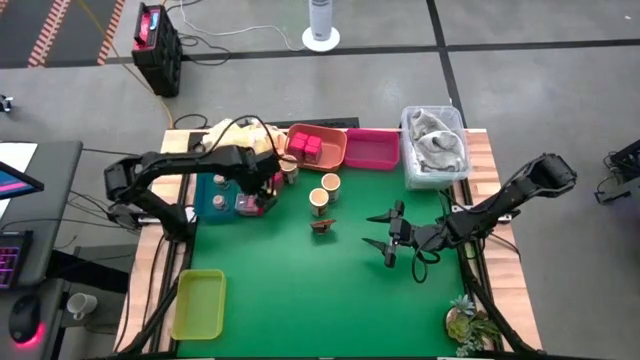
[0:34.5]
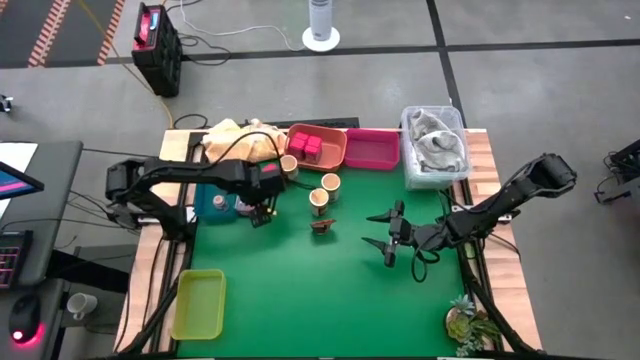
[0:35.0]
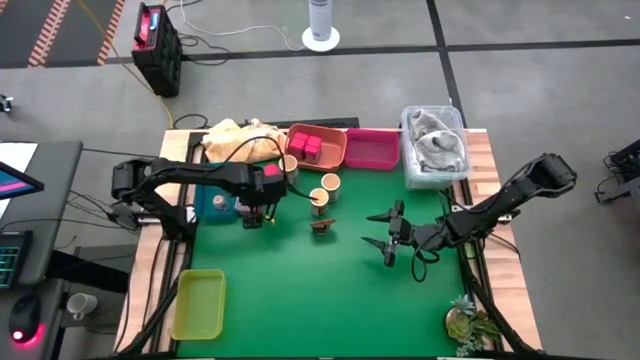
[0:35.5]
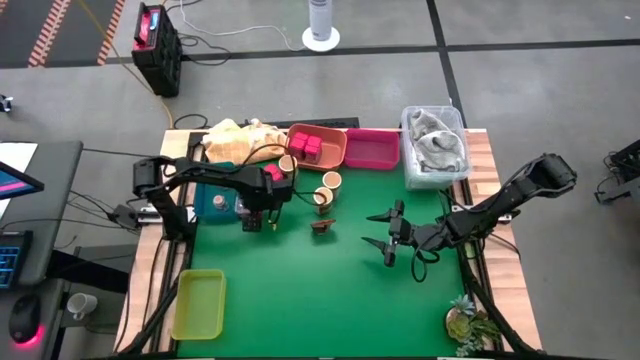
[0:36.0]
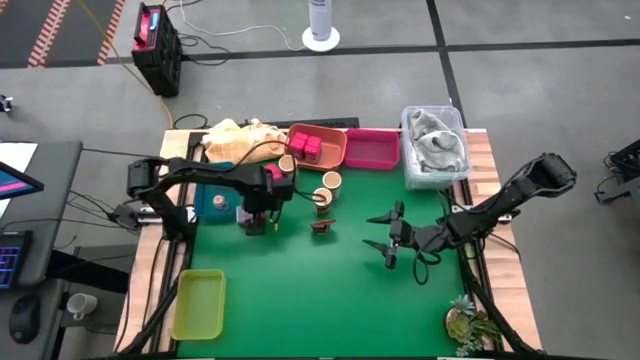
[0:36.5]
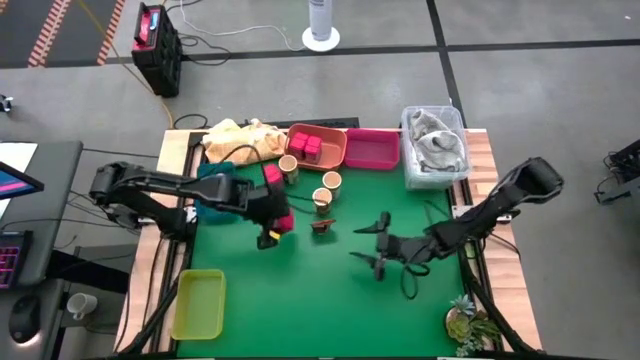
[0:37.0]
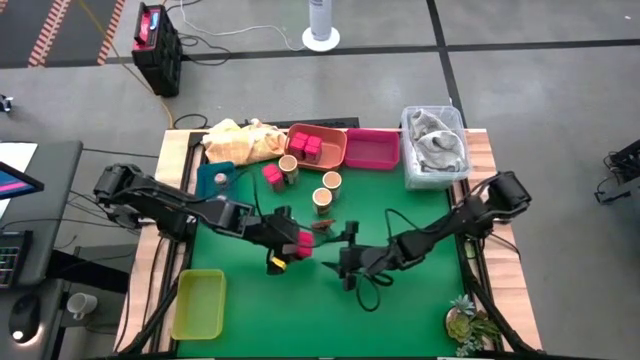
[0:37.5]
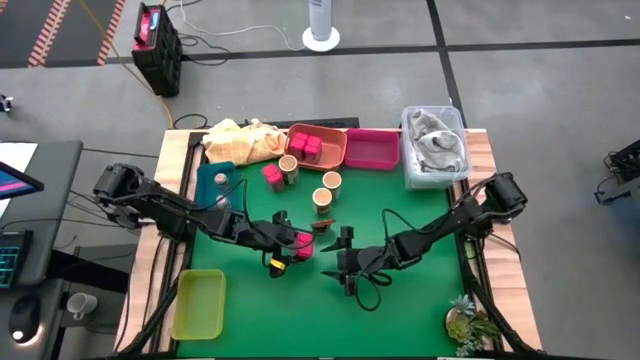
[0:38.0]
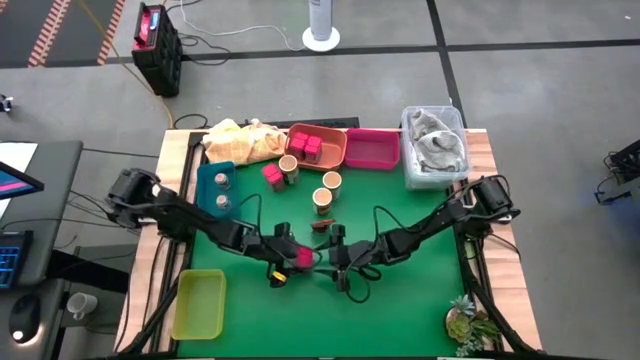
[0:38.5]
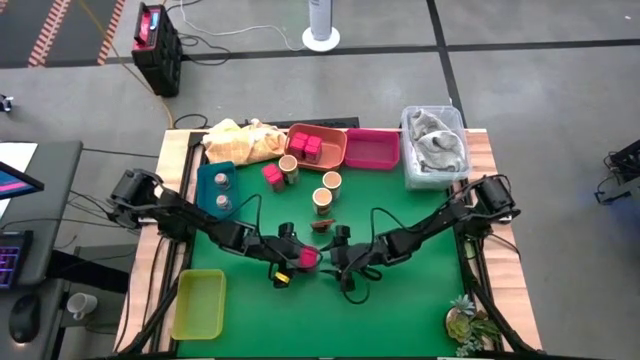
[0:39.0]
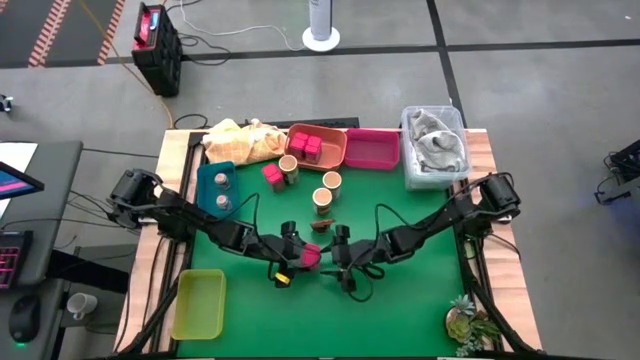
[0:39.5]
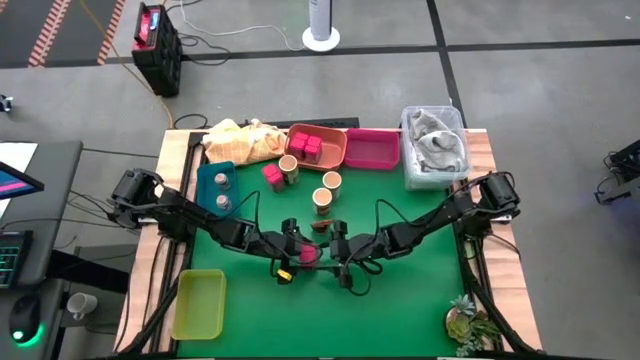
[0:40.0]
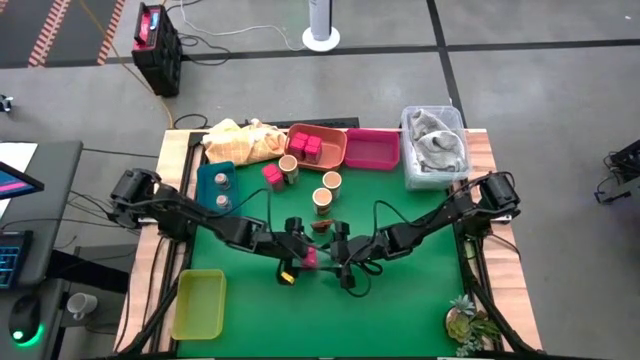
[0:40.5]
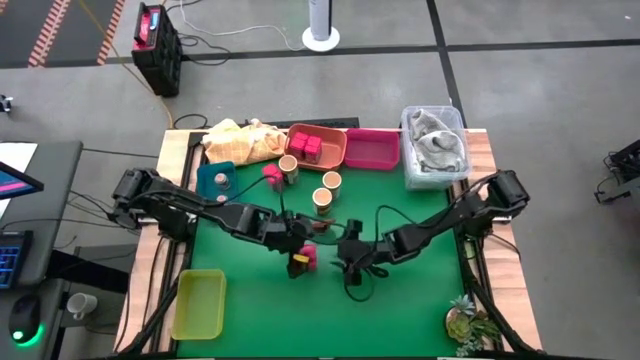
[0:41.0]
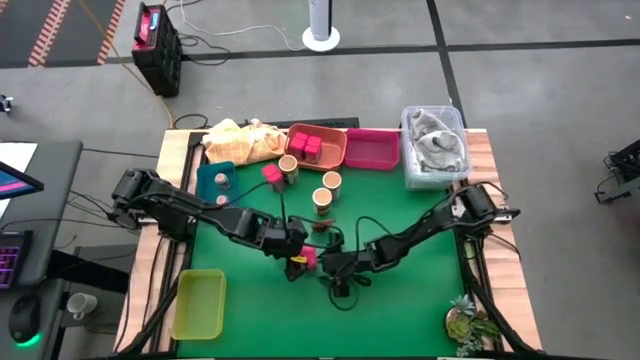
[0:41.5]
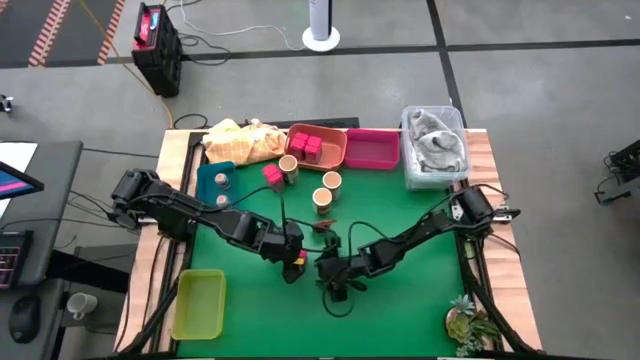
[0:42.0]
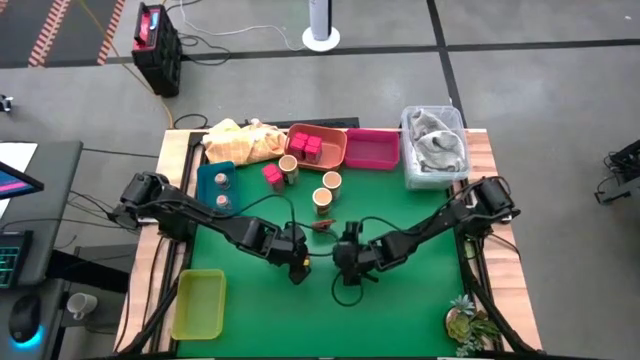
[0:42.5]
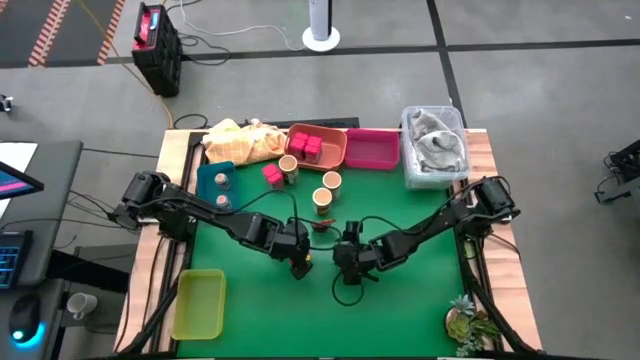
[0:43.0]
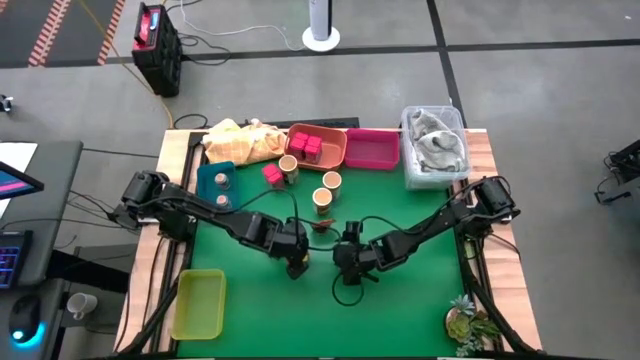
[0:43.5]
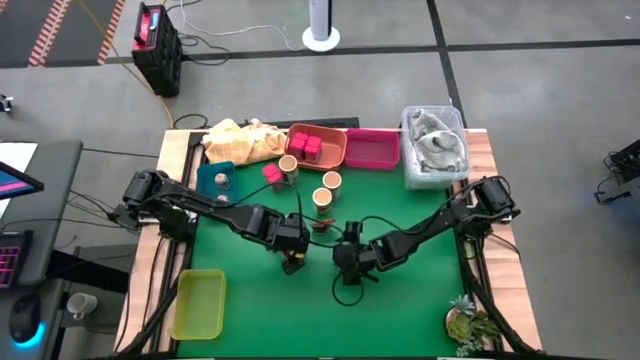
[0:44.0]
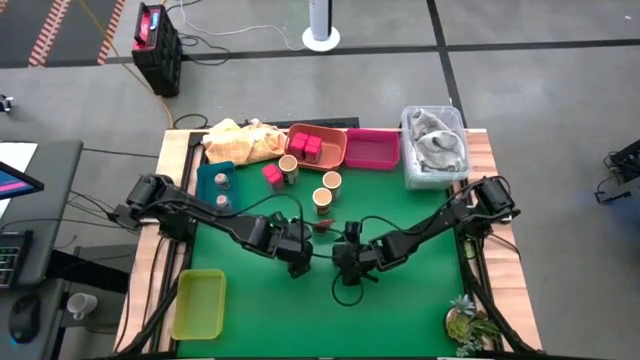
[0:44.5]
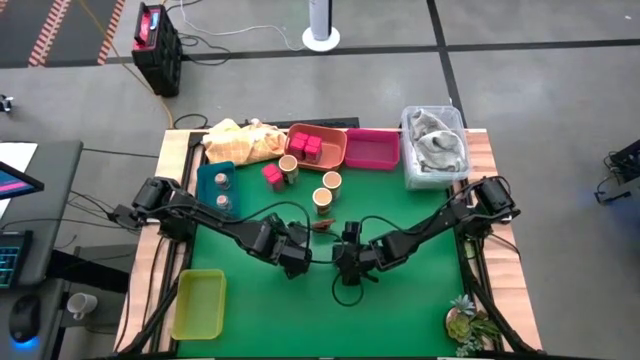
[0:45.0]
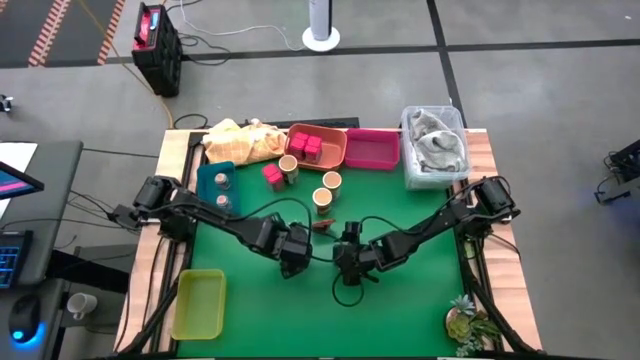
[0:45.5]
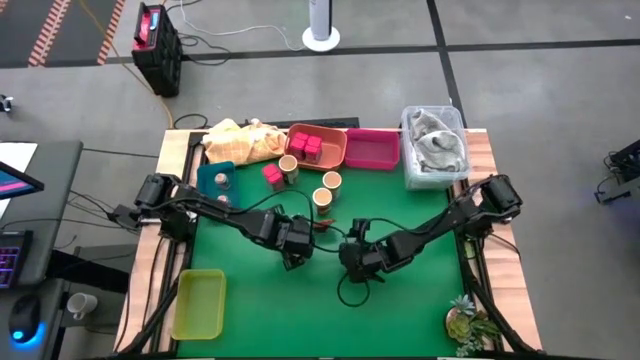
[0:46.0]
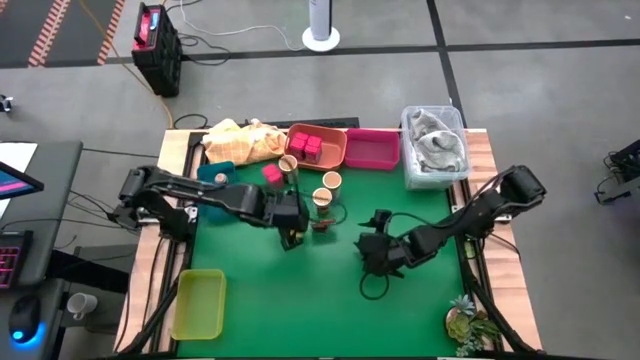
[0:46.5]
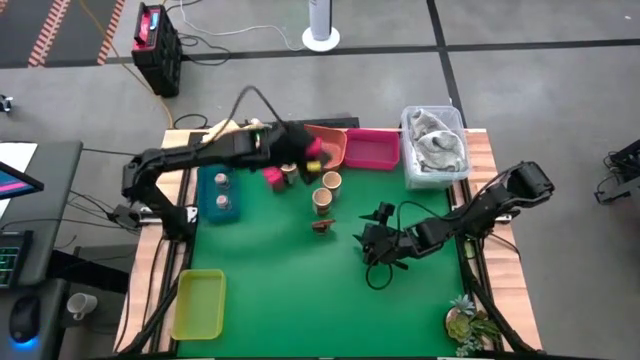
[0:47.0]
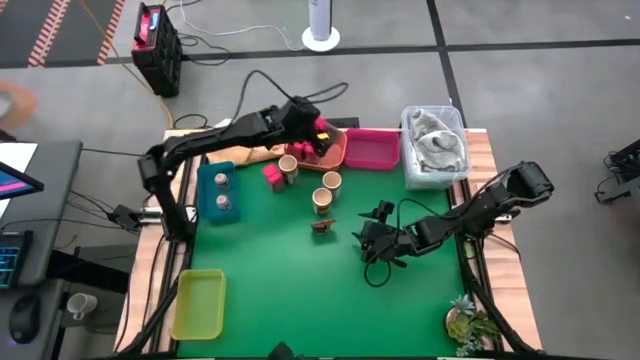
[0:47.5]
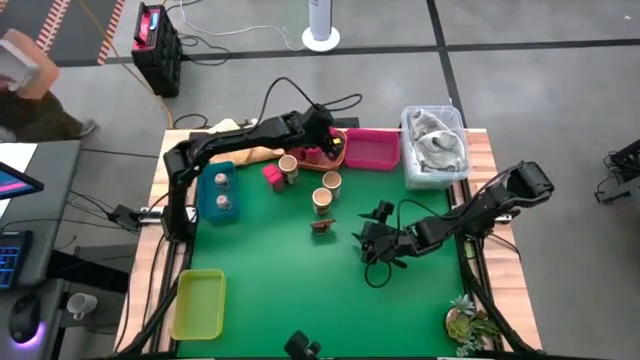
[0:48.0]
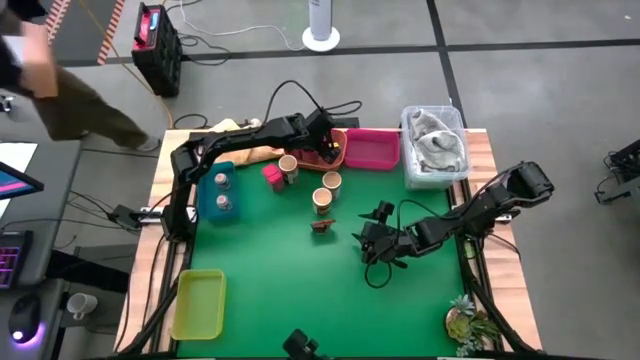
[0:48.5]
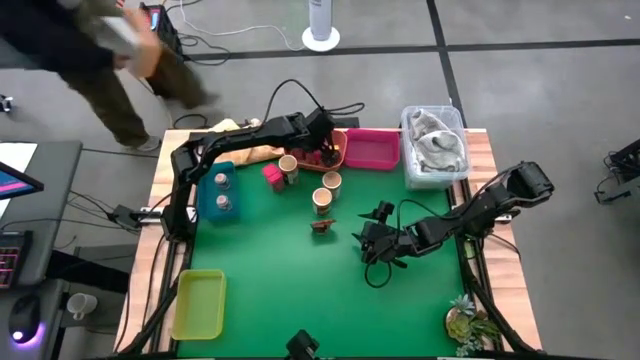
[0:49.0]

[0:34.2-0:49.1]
Task: Sort spices by type
Put the left red seasoning can into the orange bin

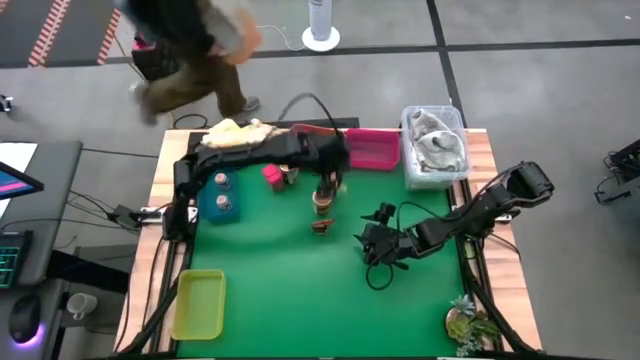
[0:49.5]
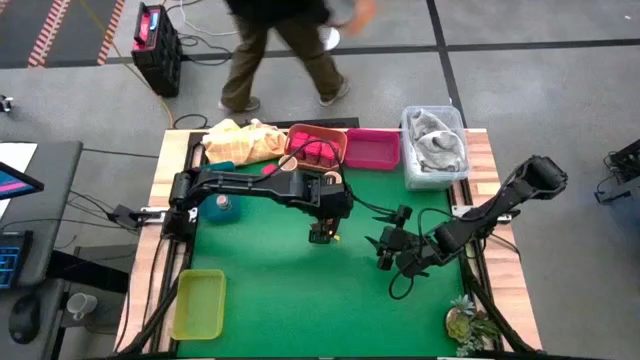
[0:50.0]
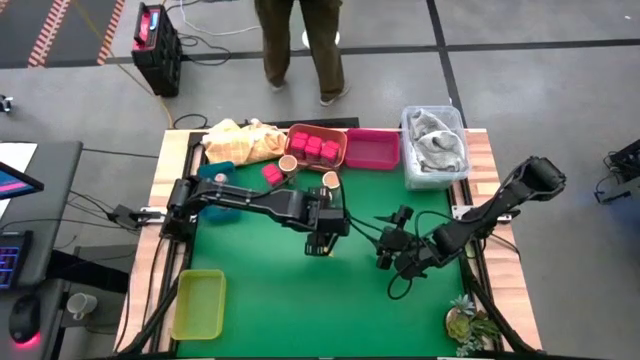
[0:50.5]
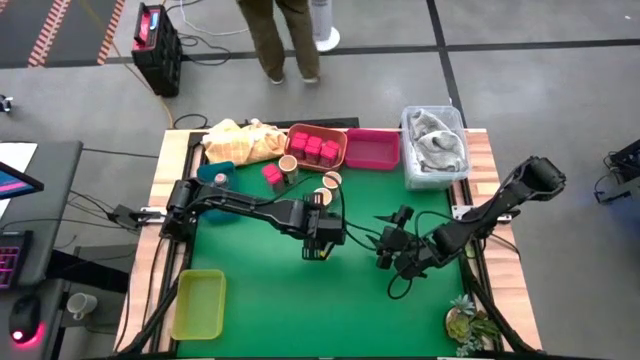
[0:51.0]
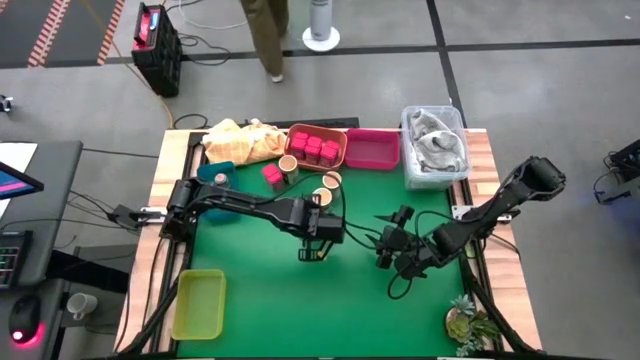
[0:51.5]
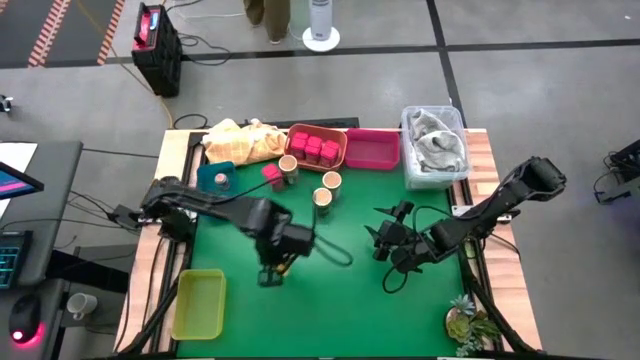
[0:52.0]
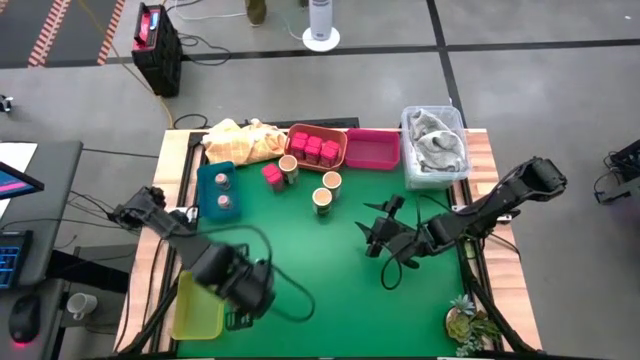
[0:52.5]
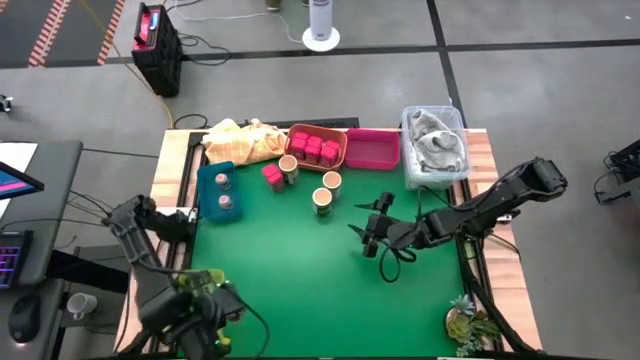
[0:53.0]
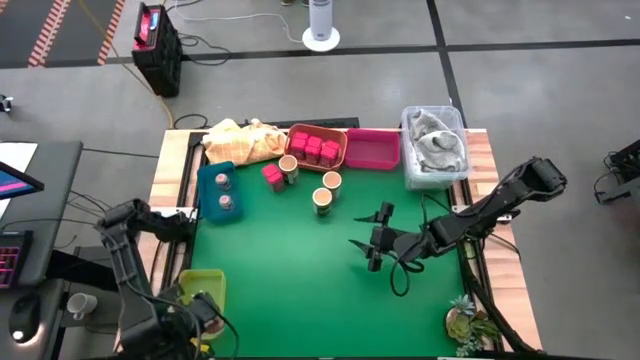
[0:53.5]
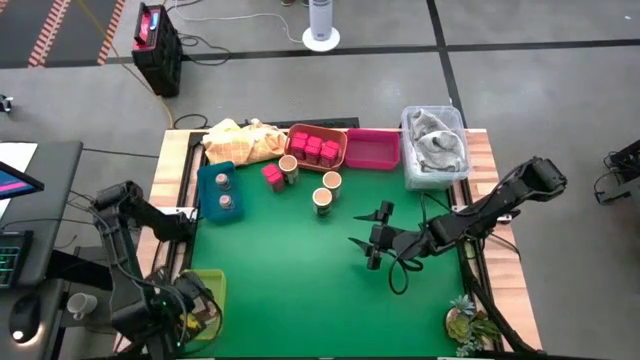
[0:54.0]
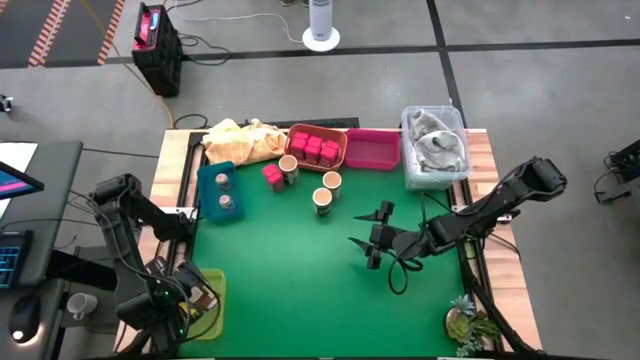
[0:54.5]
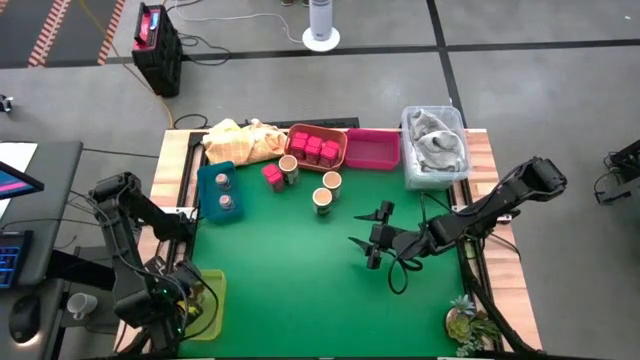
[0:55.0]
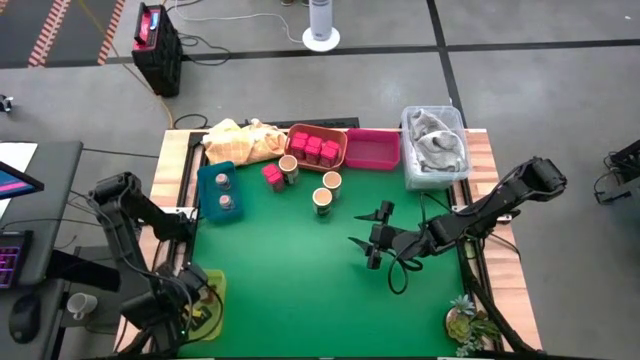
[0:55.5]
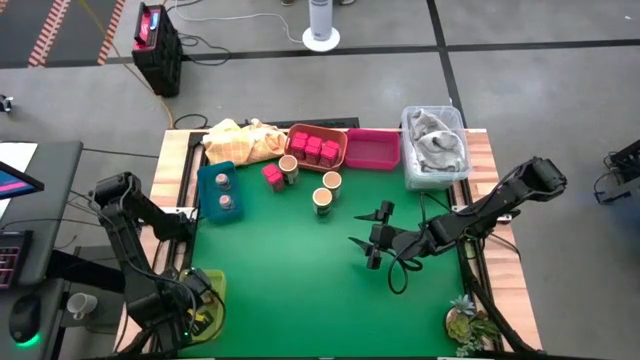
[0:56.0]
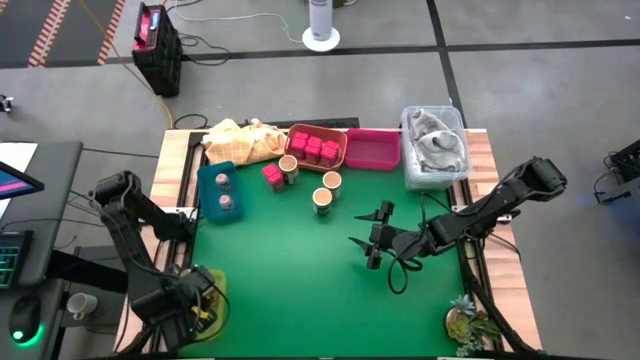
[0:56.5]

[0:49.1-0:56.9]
Put the orange seasoning bag into the yellow bin
